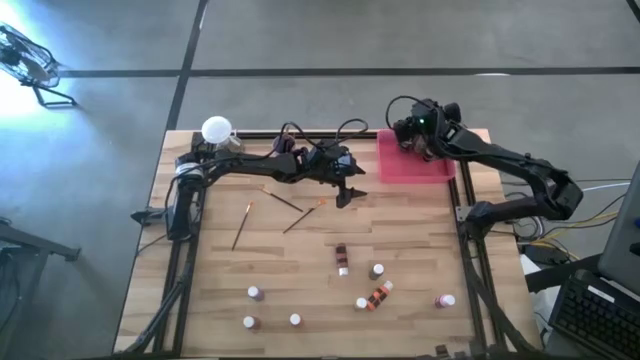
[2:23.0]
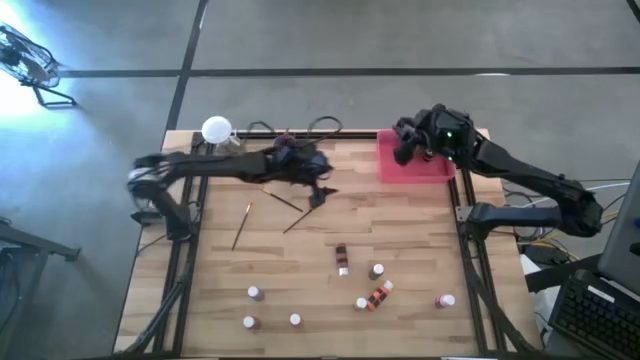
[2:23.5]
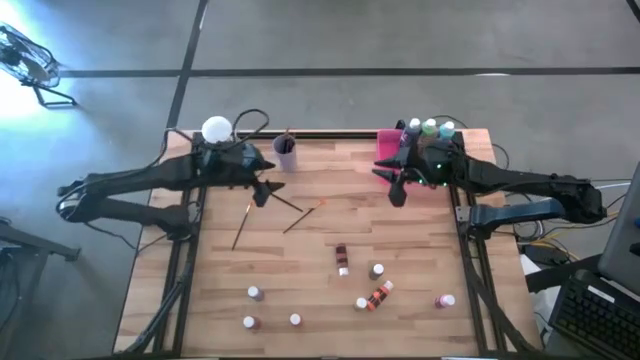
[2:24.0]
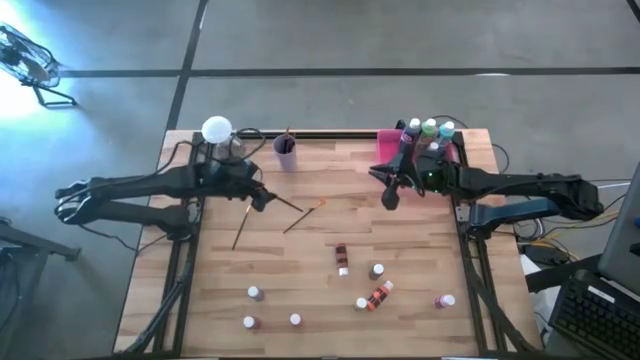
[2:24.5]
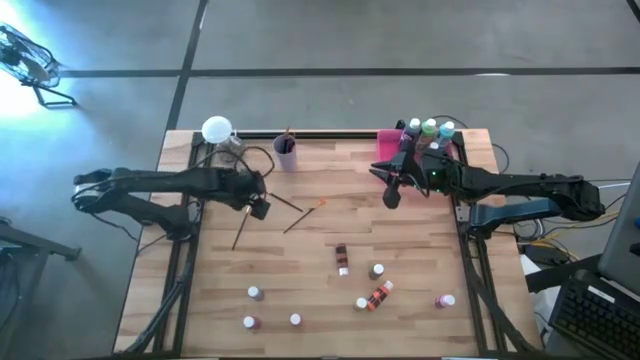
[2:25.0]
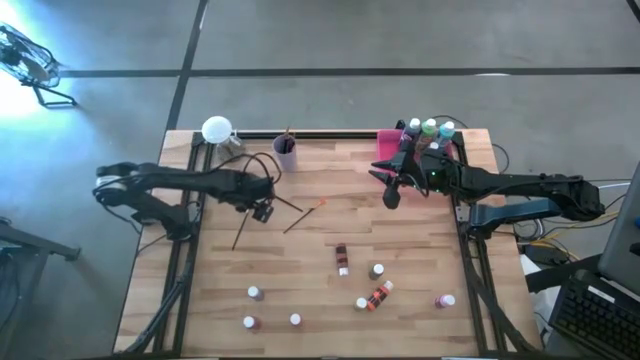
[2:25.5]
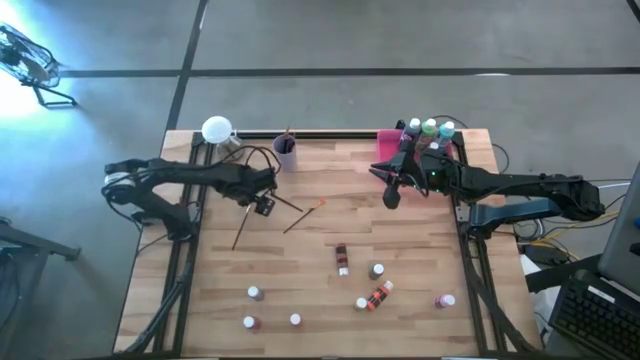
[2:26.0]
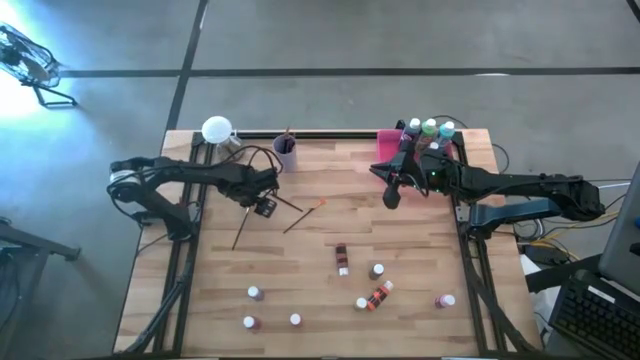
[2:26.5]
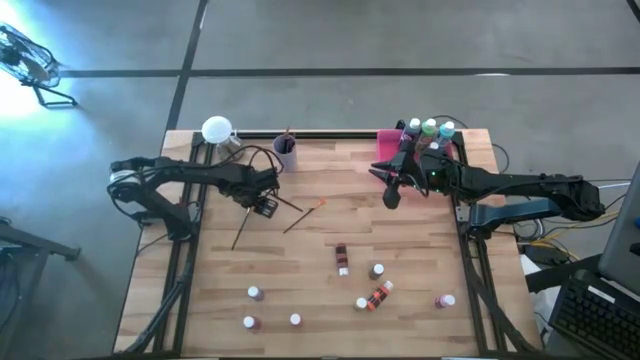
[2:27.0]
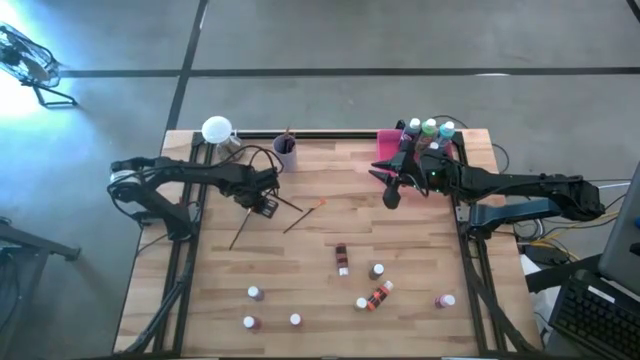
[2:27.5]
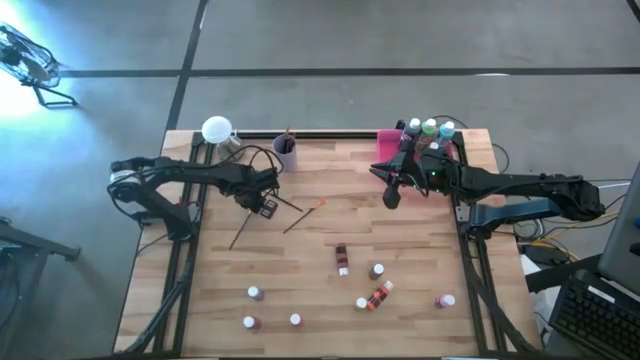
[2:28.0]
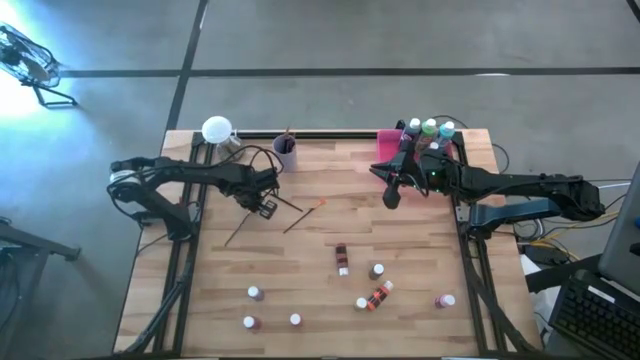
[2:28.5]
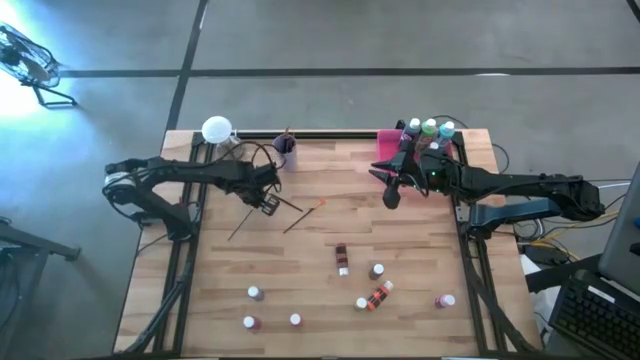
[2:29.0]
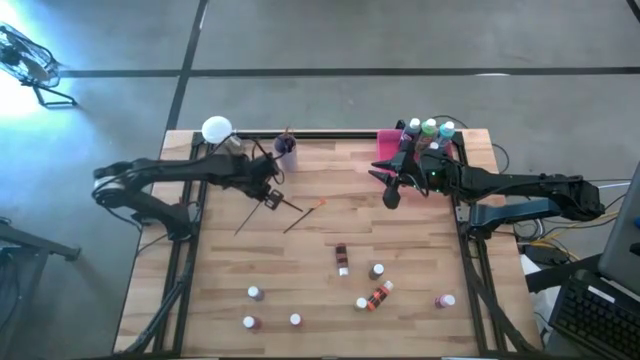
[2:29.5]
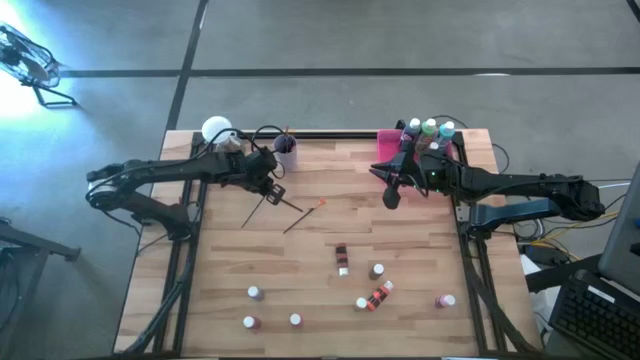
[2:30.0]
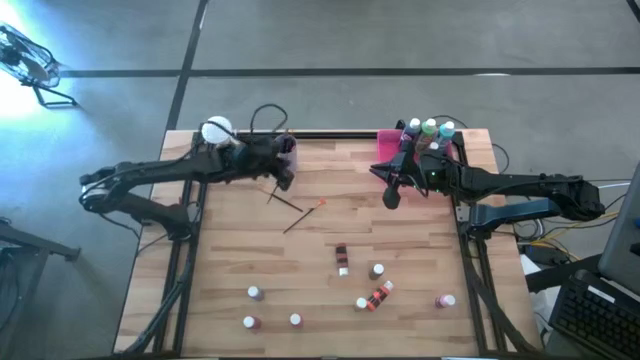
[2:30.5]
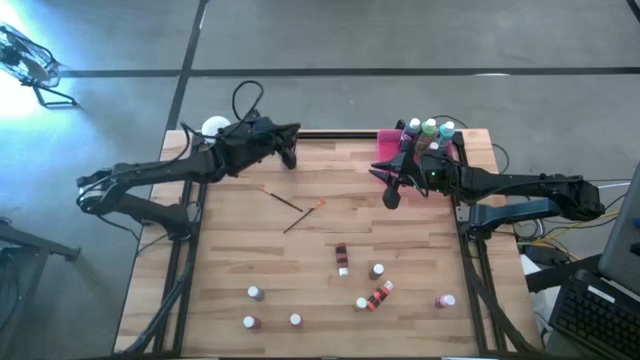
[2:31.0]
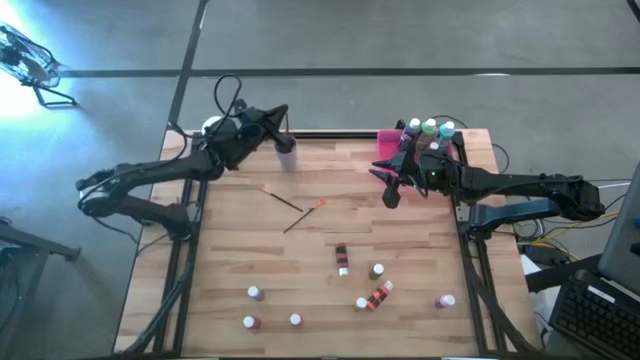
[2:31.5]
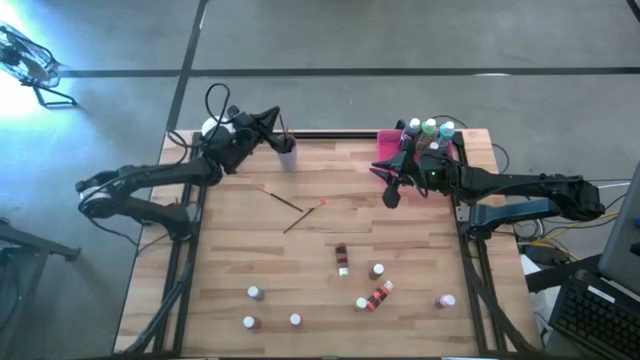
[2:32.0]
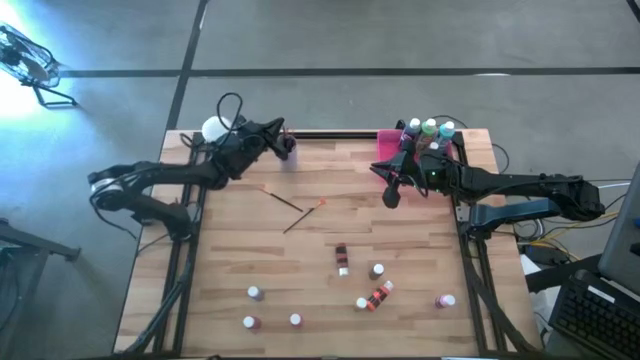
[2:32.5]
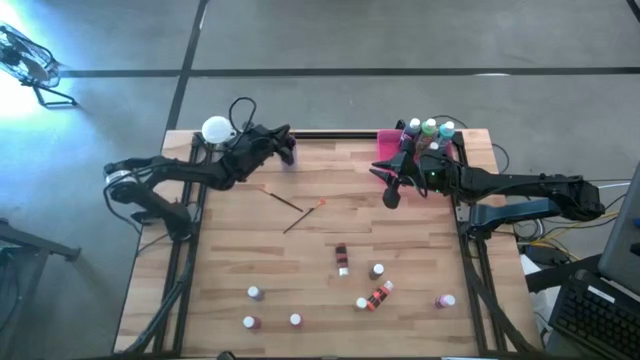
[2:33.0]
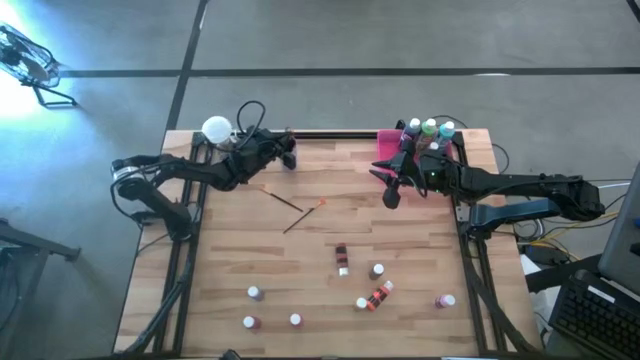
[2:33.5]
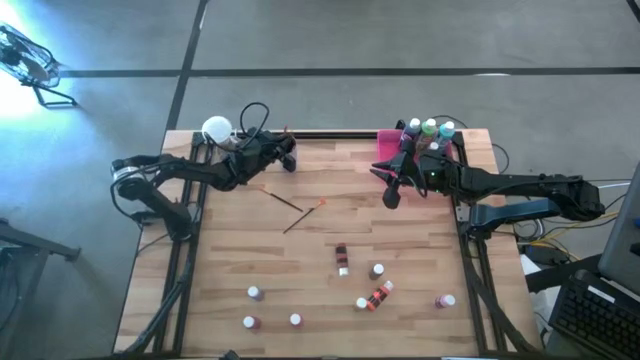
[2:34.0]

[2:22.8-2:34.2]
Task: Pick & Place Paint Supplies
Put the gold black paint brush into the purple cup

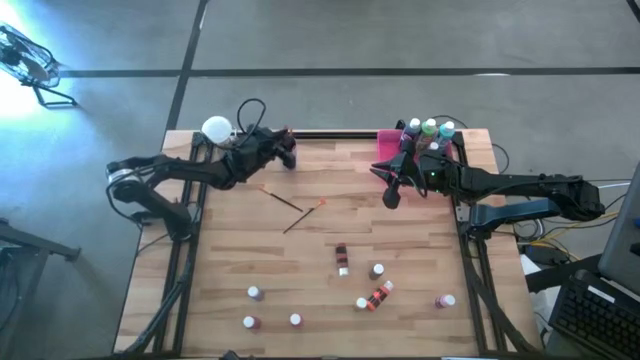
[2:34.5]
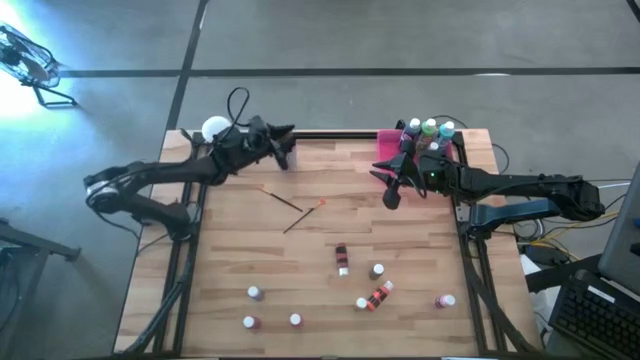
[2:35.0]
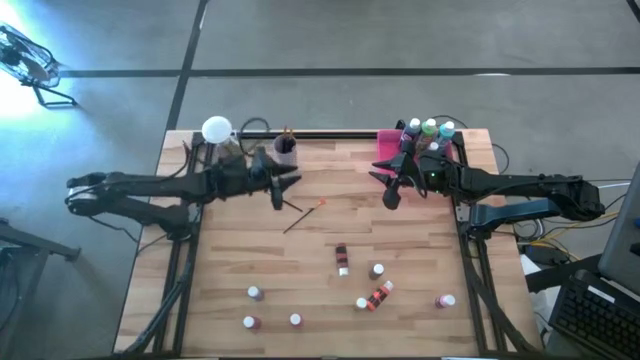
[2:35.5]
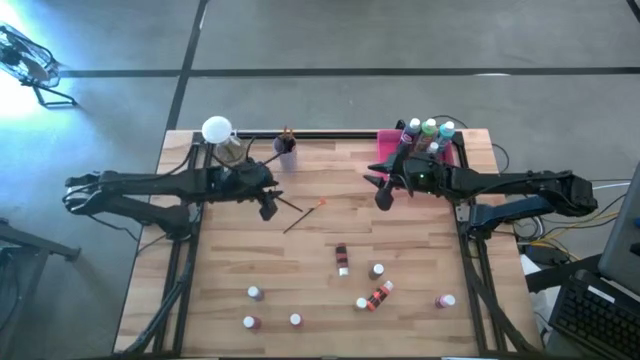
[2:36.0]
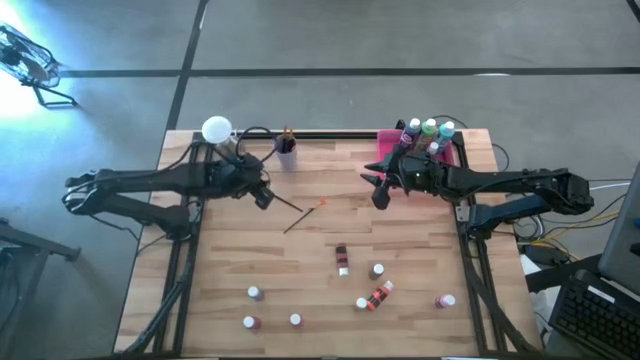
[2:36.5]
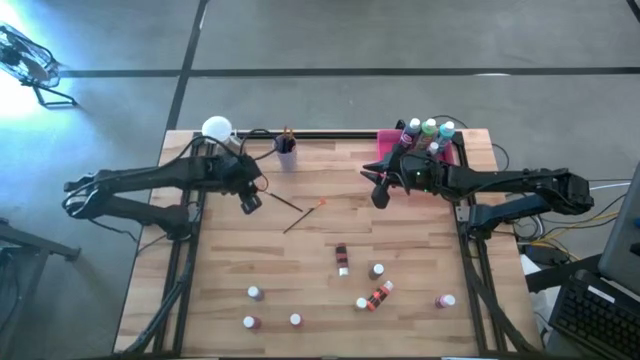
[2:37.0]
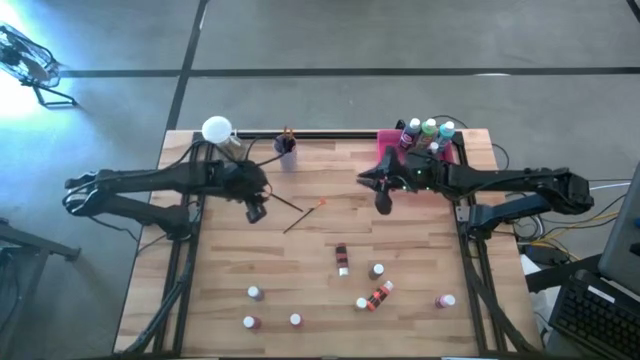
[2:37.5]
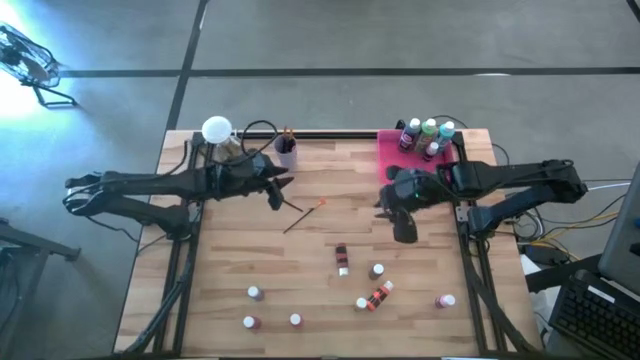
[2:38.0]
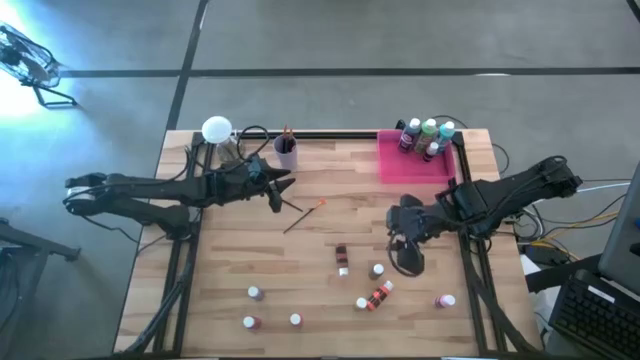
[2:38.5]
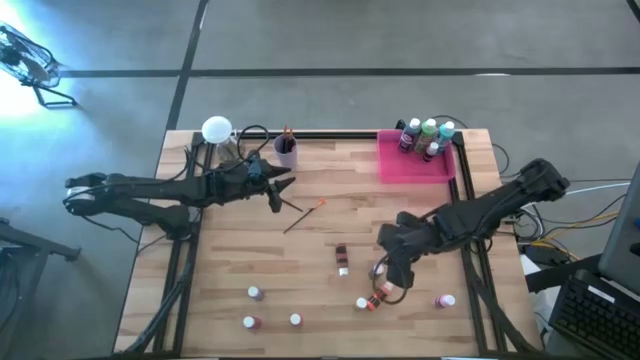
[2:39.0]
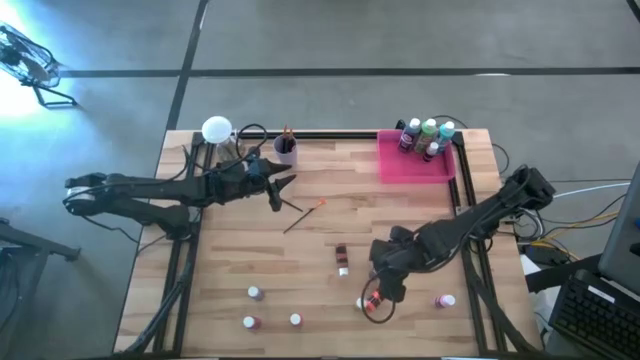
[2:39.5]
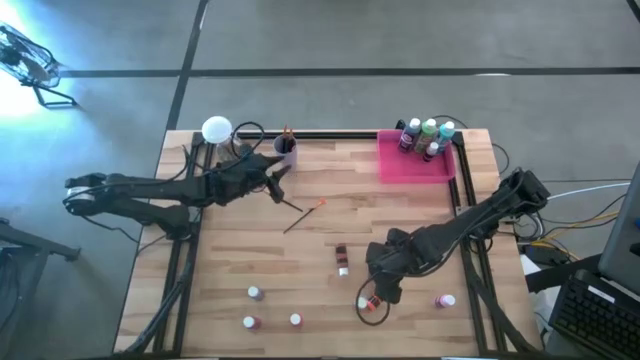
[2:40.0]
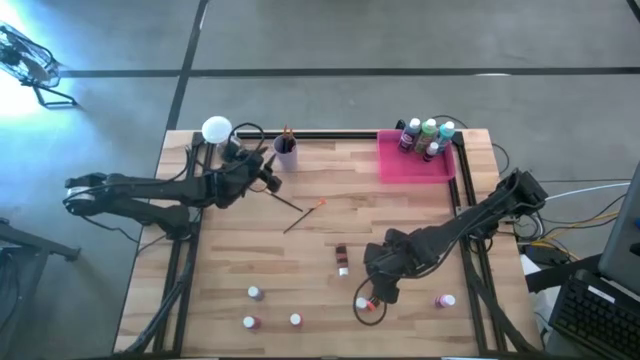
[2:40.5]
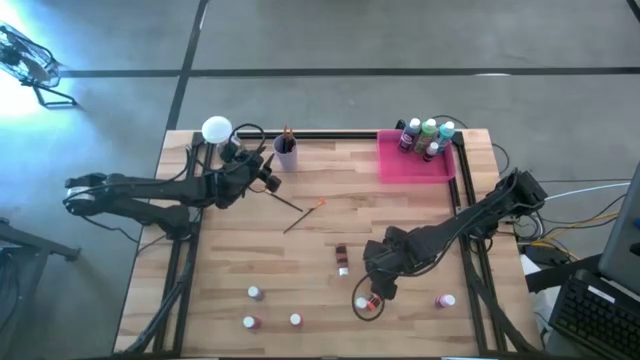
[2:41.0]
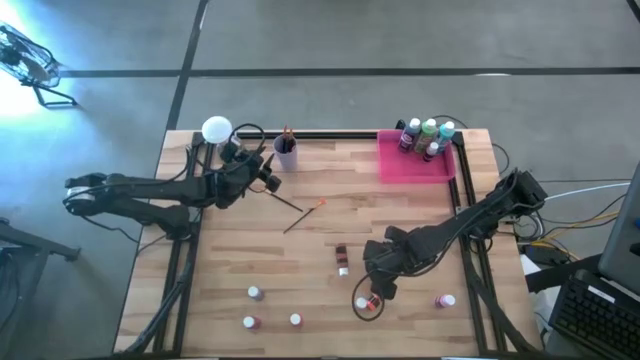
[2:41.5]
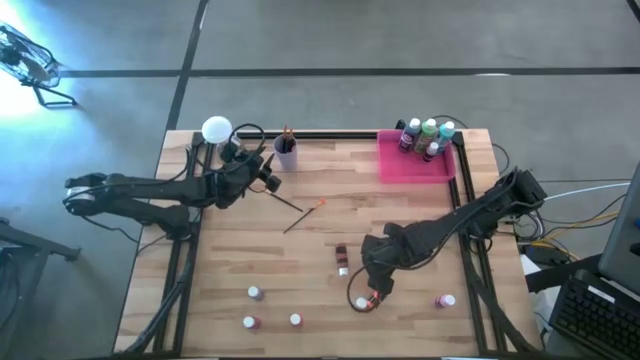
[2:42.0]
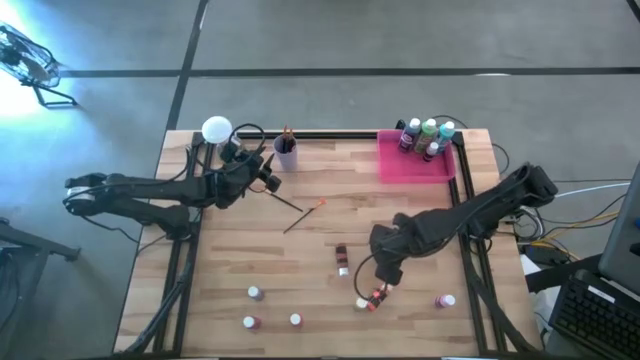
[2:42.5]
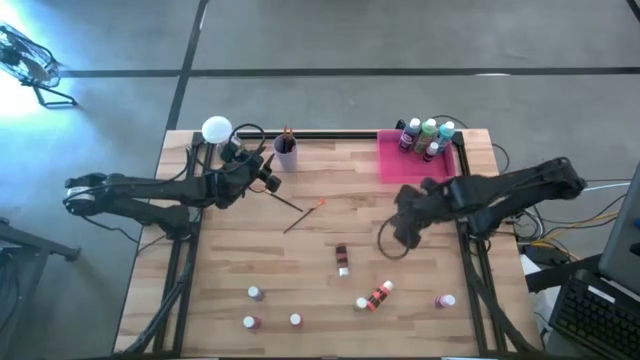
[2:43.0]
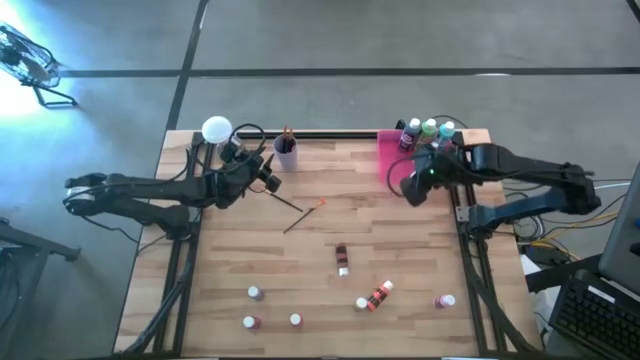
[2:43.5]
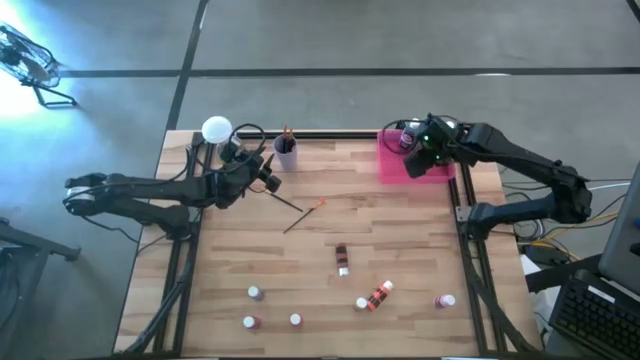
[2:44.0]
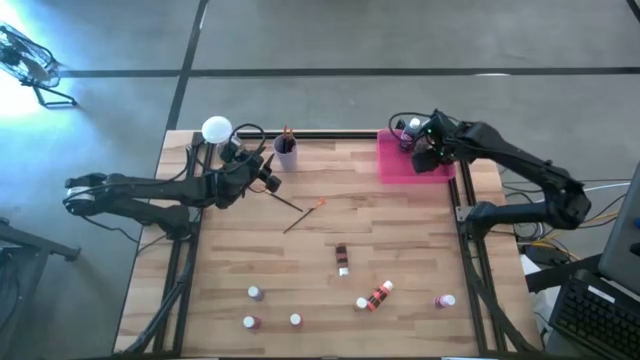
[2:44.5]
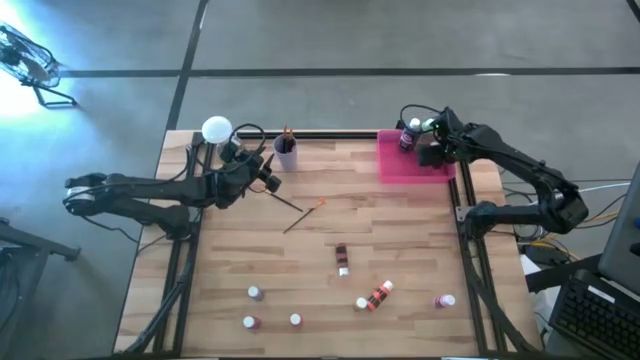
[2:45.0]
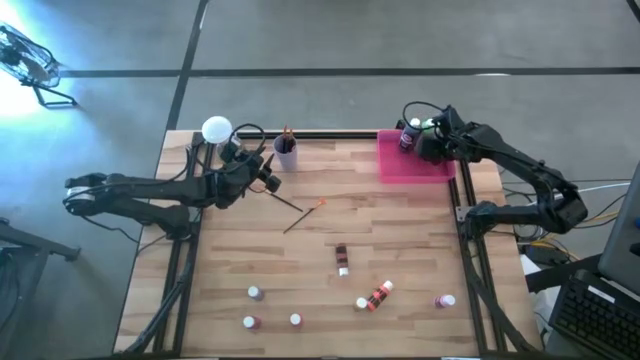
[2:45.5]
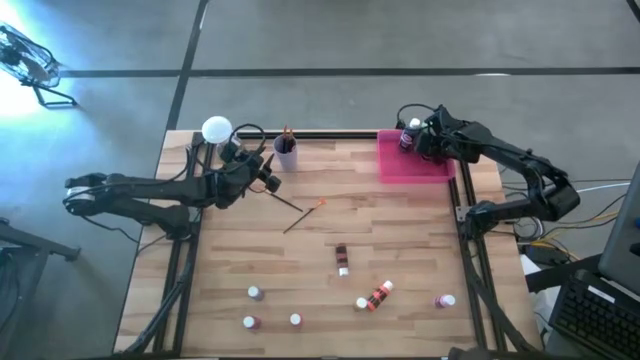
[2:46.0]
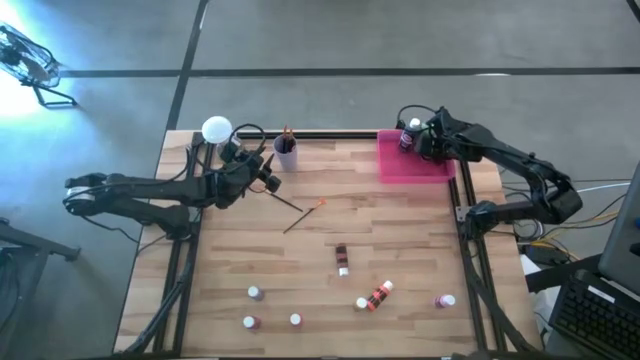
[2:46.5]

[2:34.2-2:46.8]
Put the small black paint bottle into the pink bin
